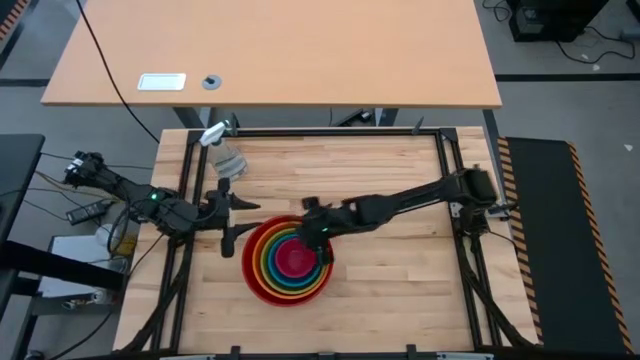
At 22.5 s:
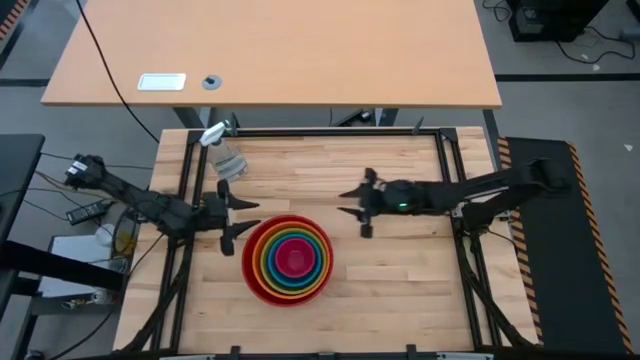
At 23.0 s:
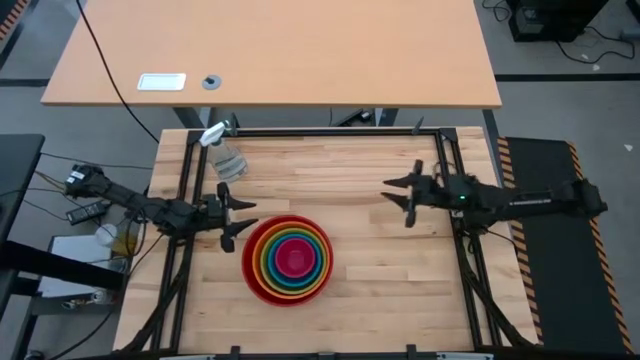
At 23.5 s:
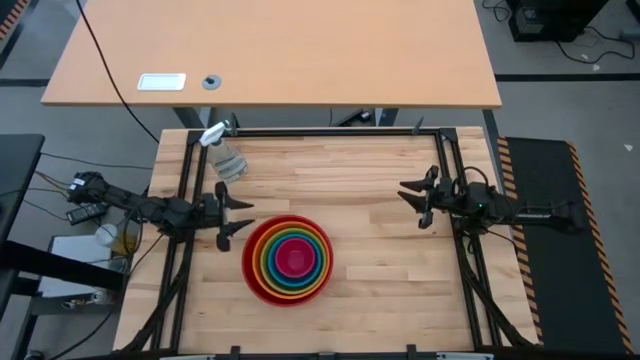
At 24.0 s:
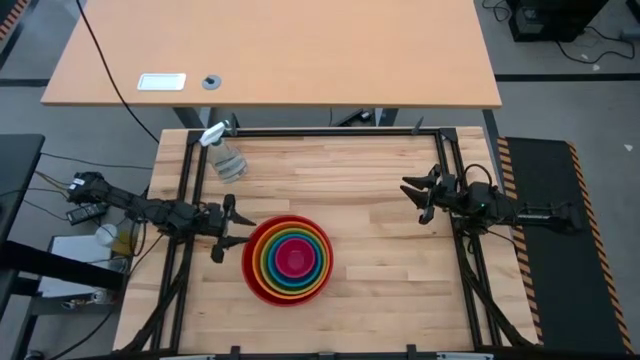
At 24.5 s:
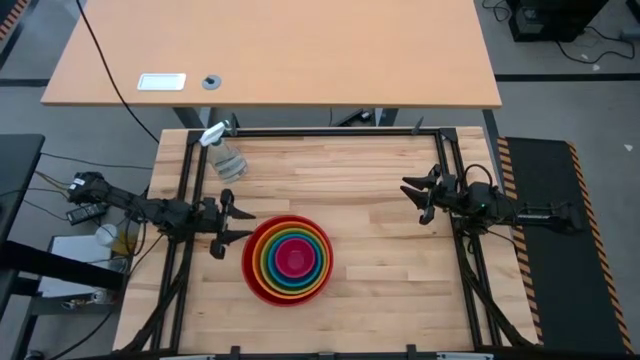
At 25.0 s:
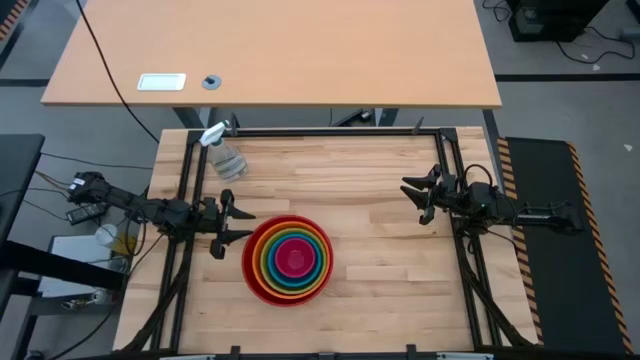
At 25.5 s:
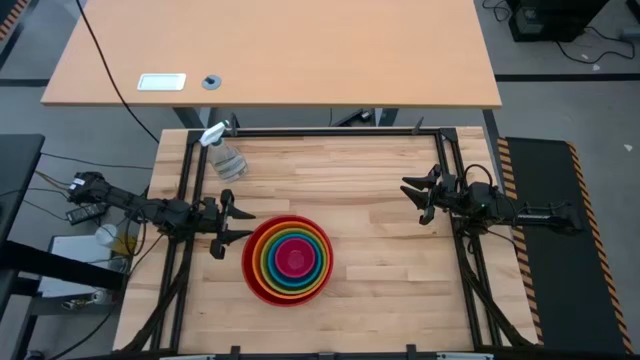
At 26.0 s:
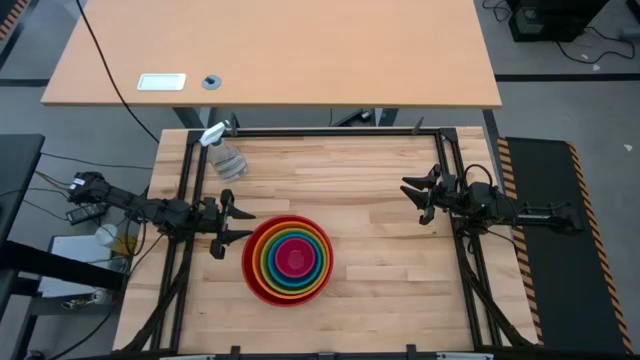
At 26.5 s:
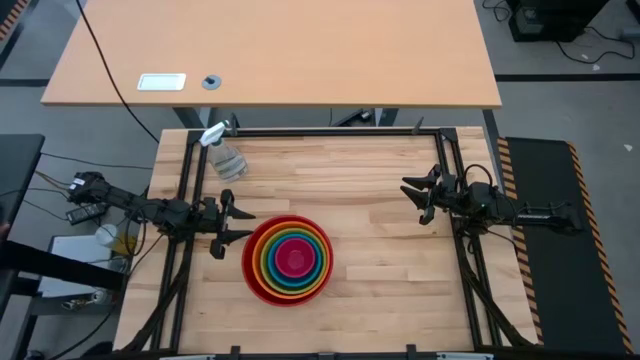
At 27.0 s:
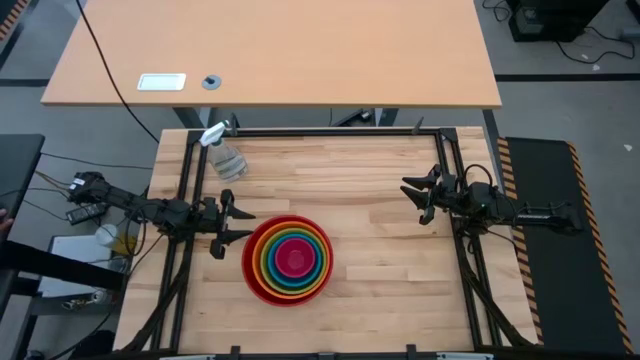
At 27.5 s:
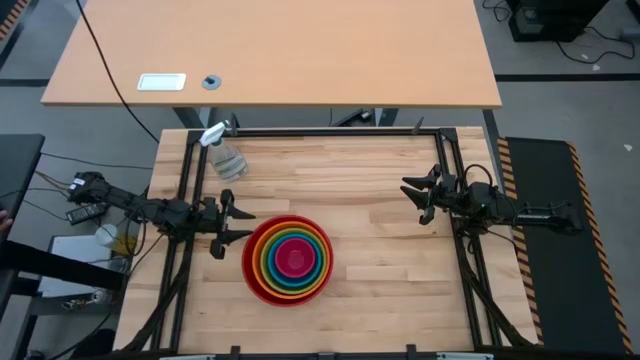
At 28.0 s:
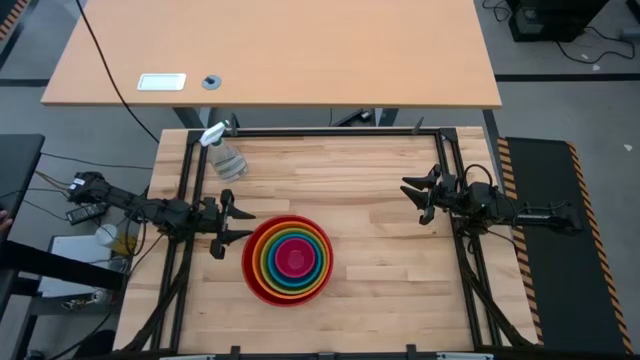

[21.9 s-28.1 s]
Return to Home Position

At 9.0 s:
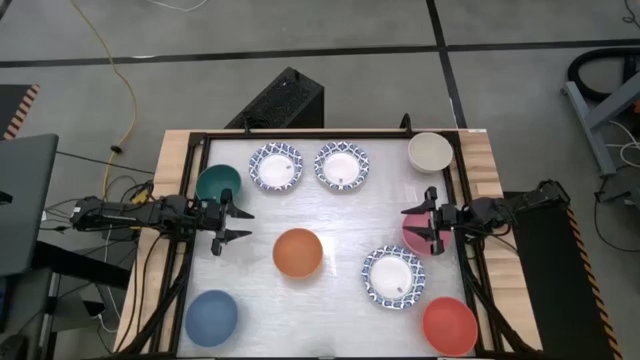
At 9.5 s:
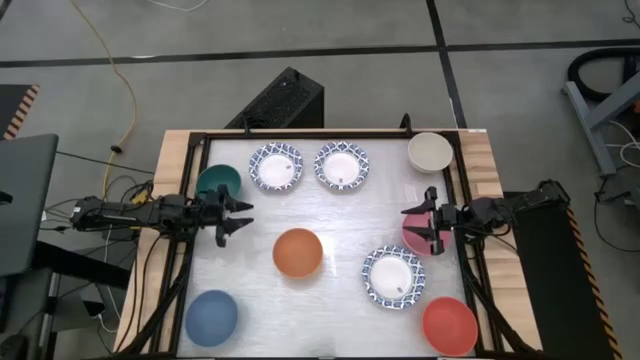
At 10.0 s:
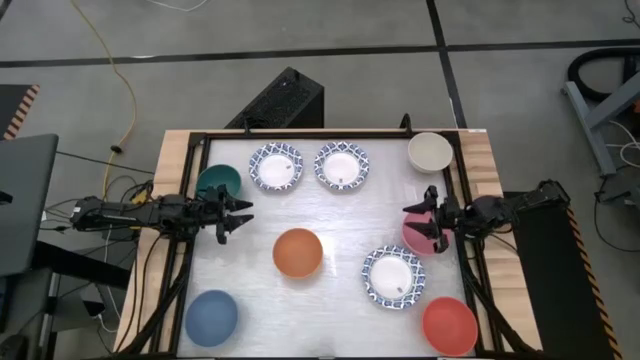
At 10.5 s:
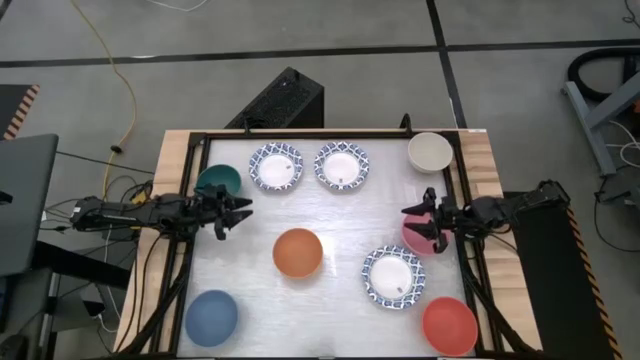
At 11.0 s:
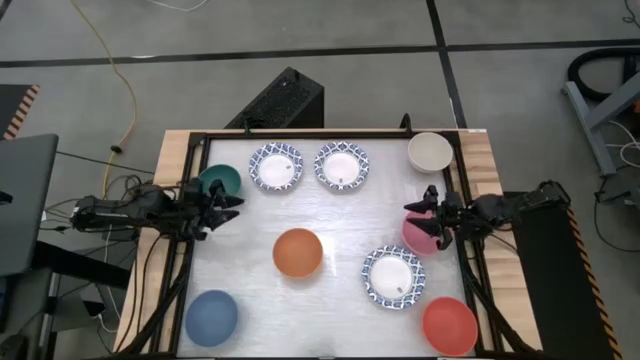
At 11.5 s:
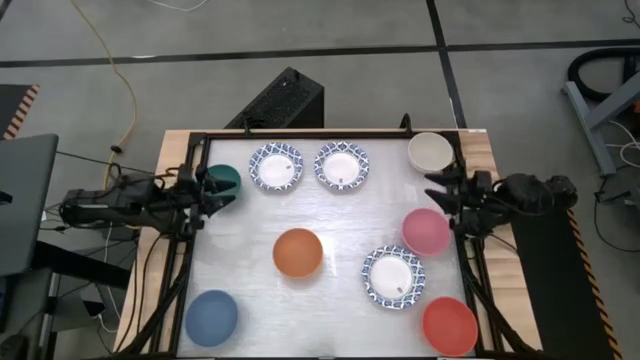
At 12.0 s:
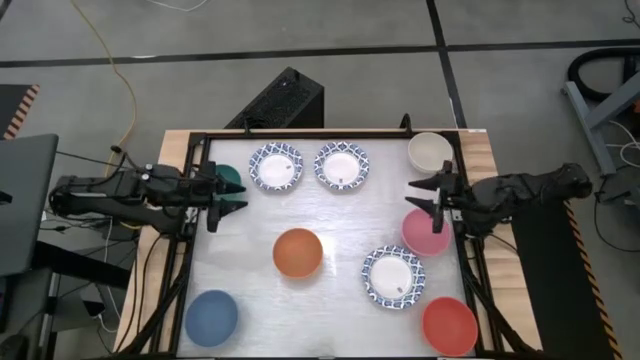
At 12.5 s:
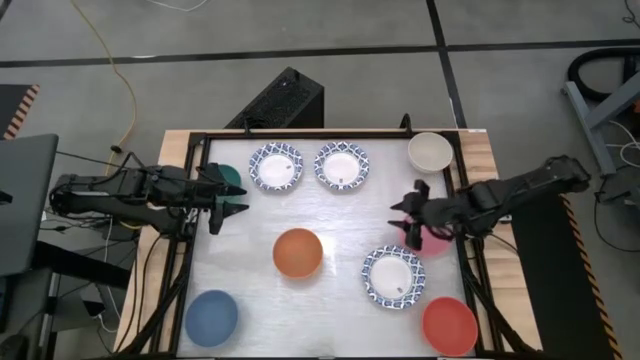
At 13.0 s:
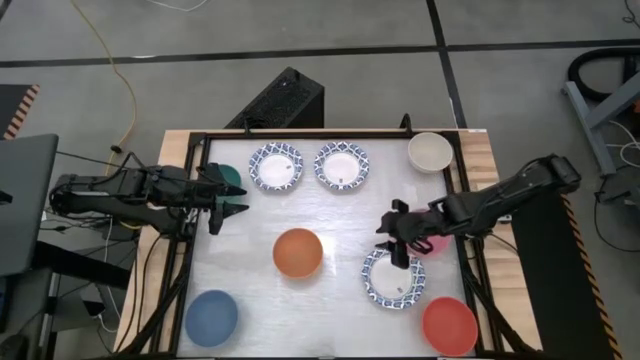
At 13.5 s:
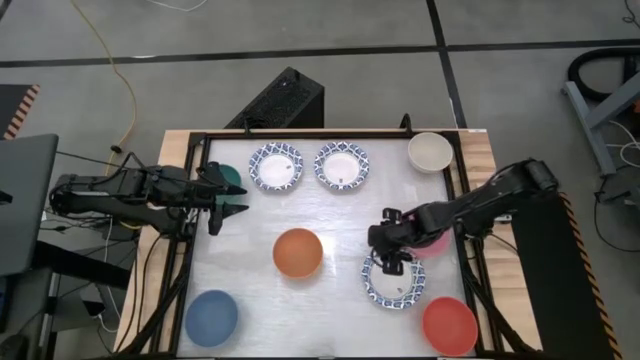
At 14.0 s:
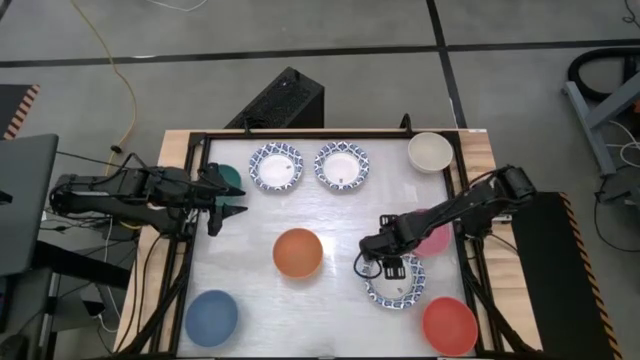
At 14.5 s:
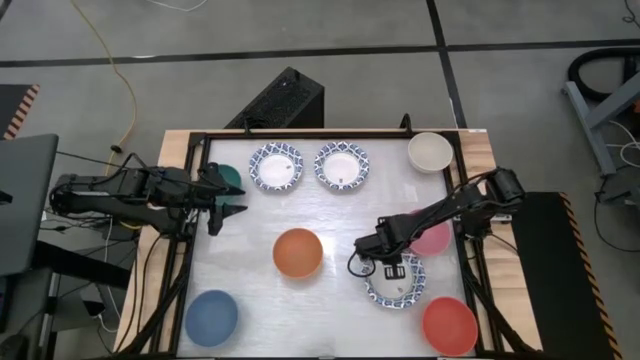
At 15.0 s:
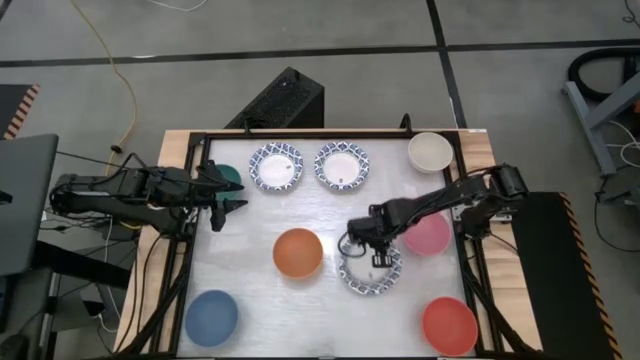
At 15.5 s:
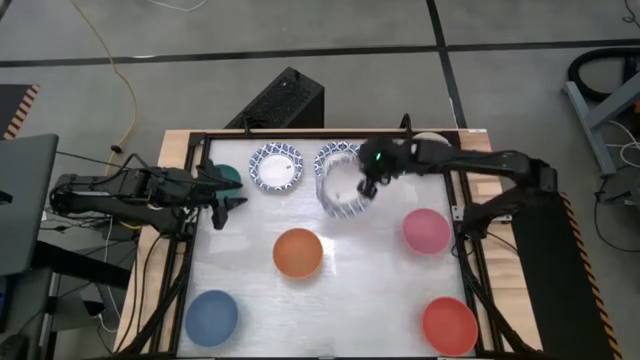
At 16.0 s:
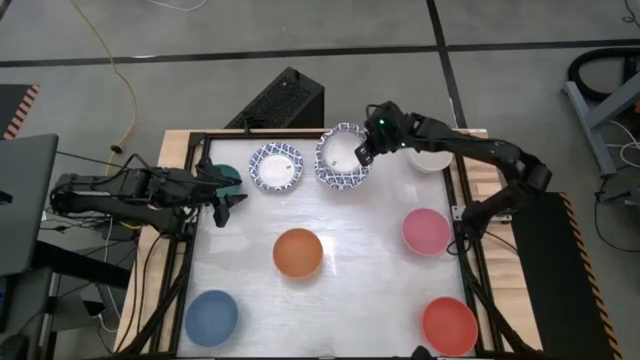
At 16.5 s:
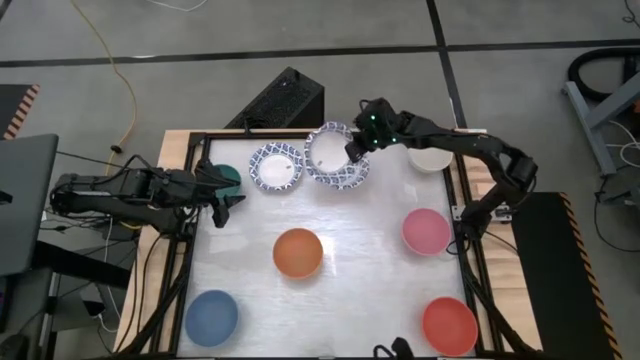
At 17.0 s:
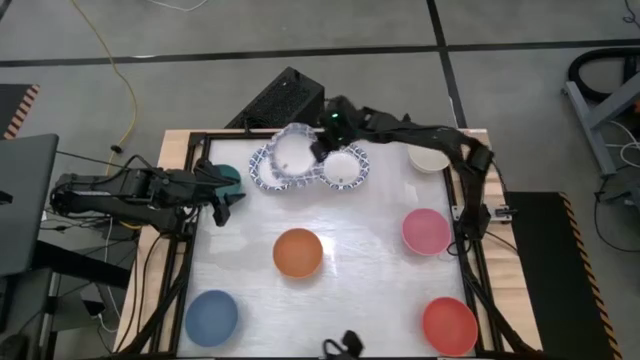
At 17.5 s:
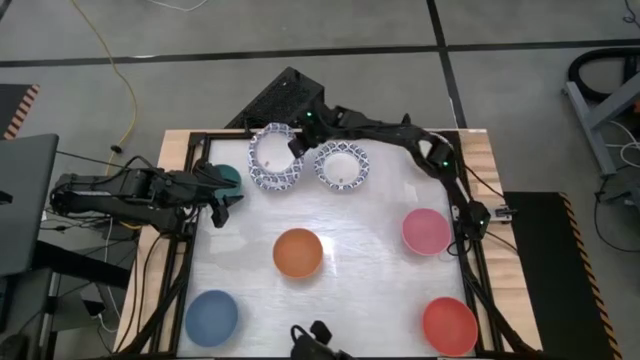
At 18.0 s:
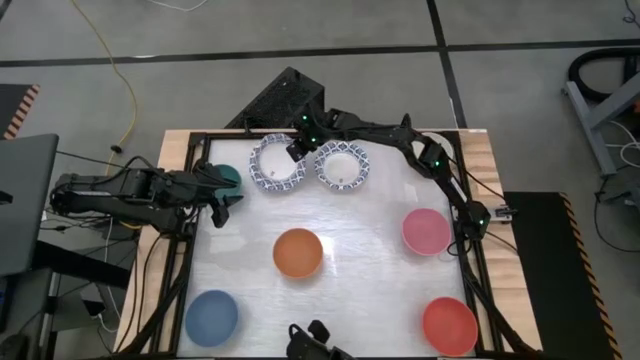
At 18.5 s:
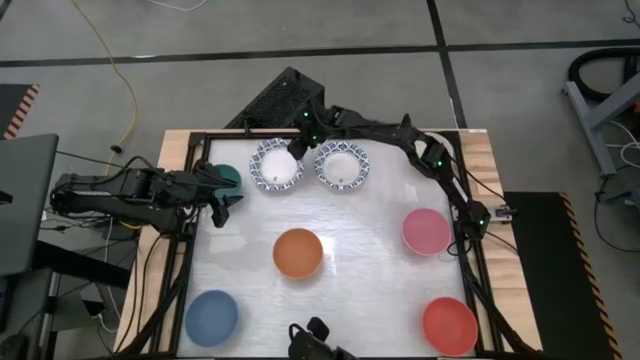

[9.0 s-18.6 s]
Stack the bottom right blue patterned bowl on the top left blue patterned bowl

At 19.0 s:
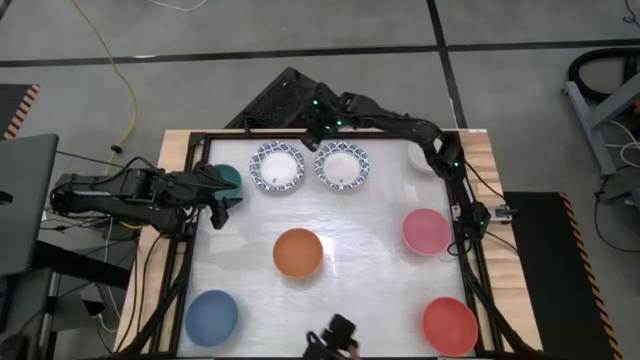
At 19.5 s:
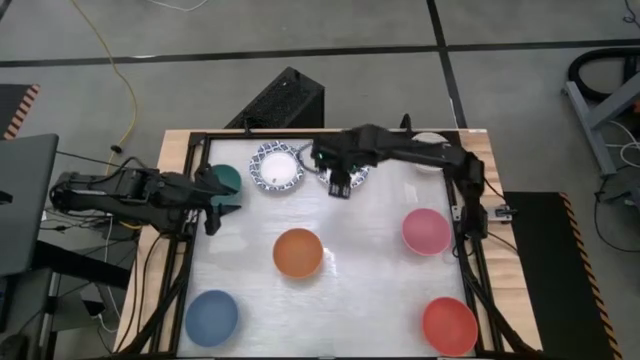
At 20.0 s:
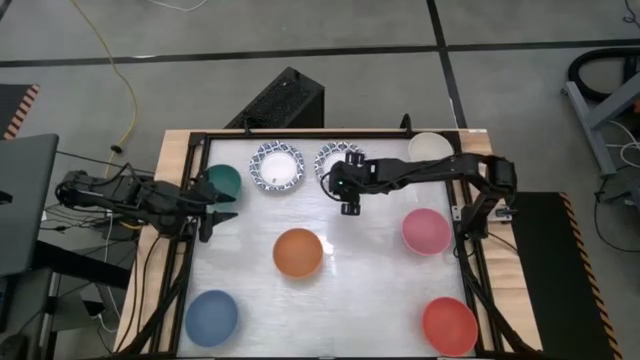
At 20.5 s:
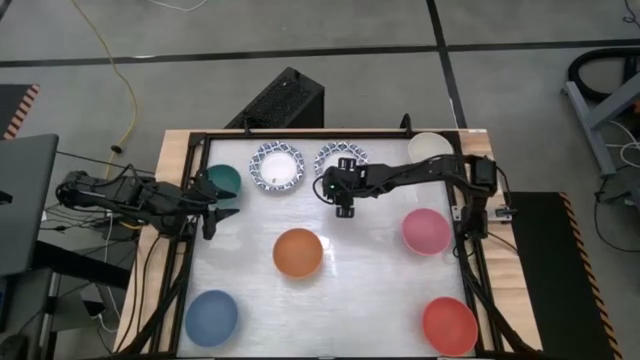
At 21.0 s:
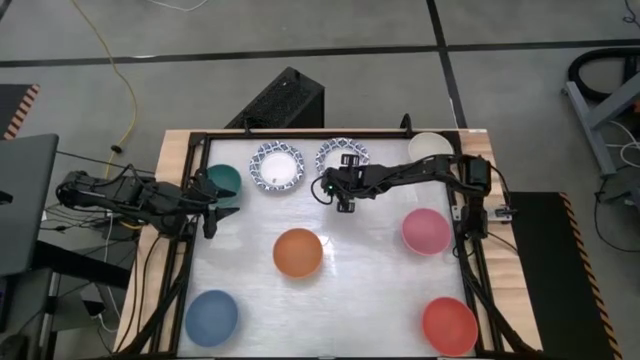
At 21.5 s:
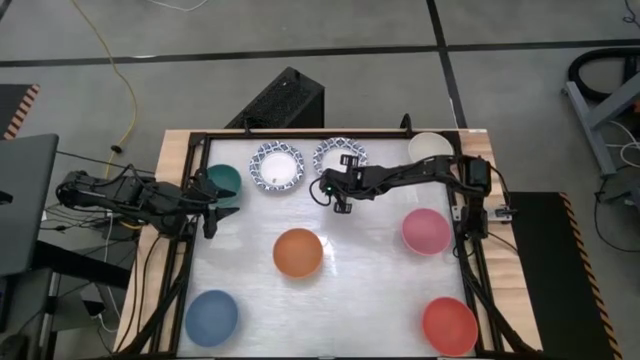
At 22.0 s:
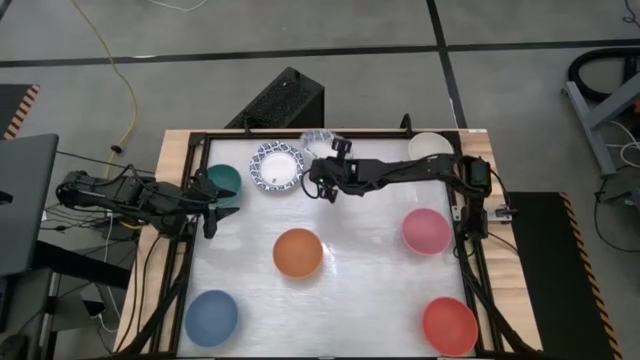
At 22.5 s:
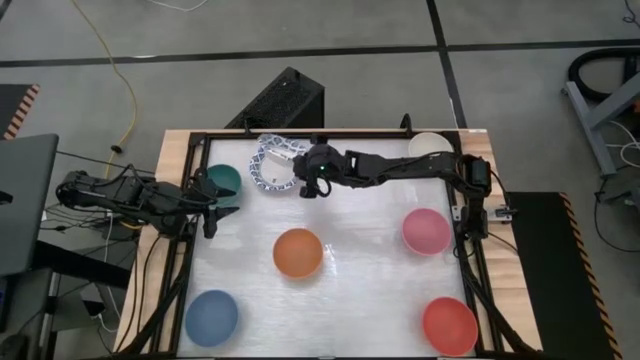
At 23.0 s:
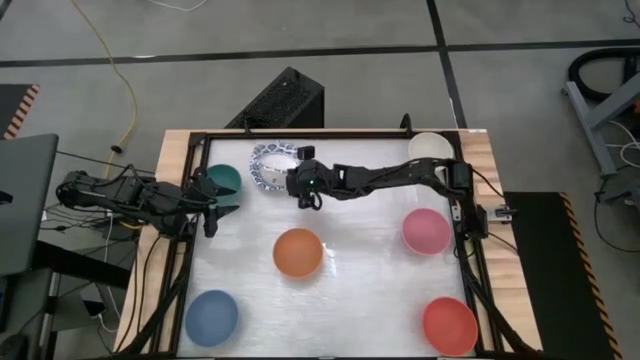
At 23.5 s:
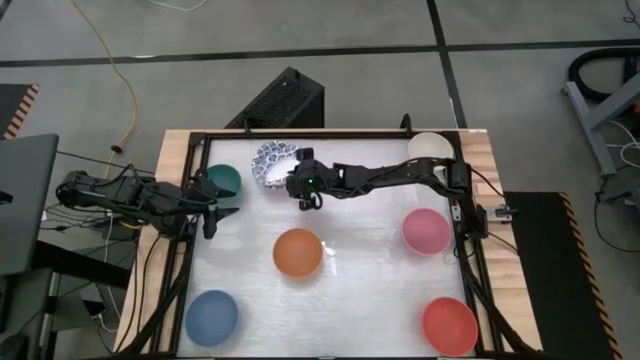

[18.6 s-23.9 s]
Stack the right blue patterned bowl on the left blue patterned bowl
